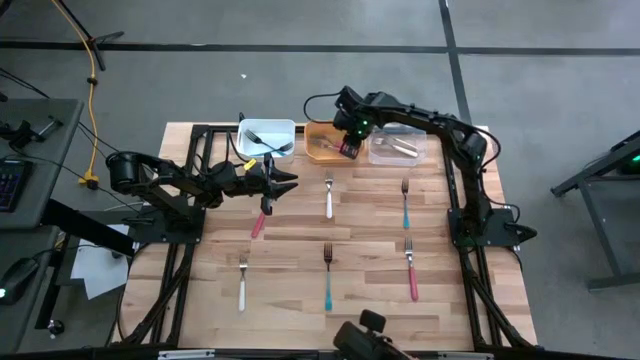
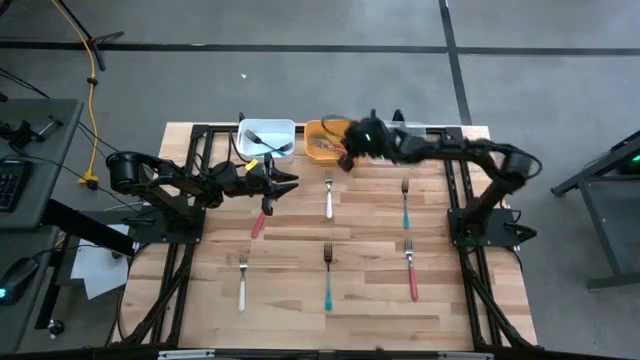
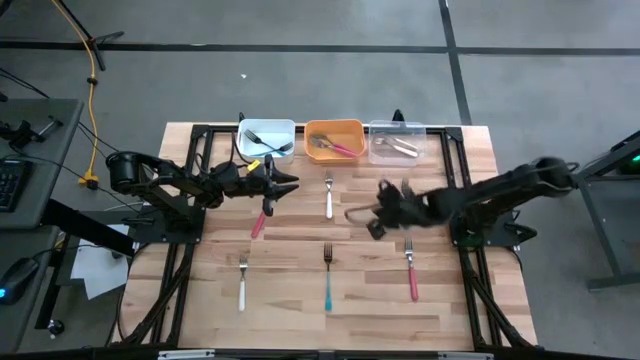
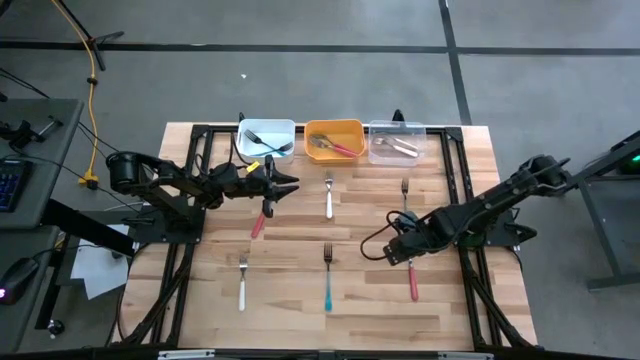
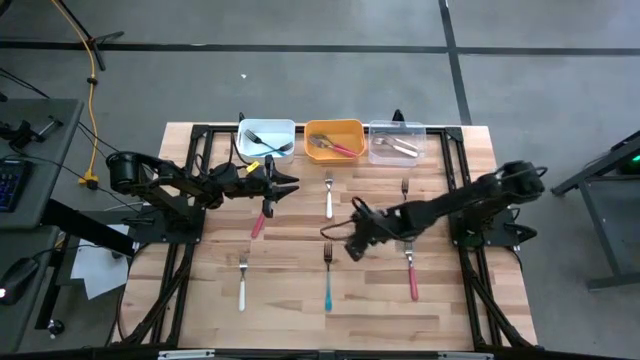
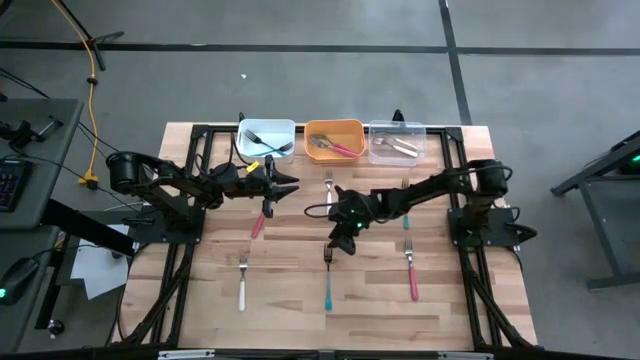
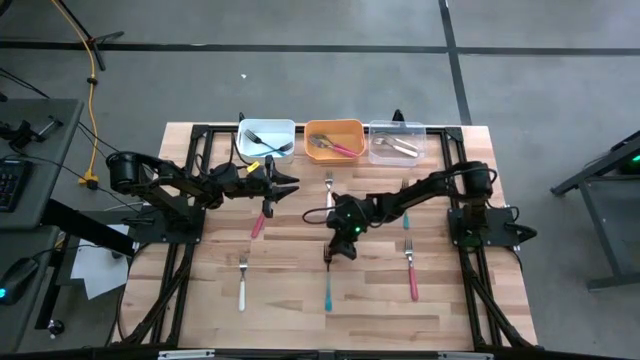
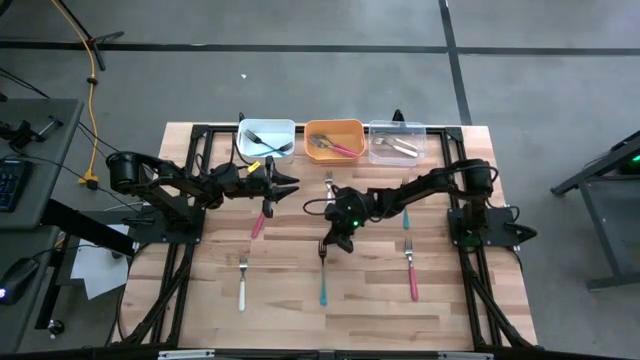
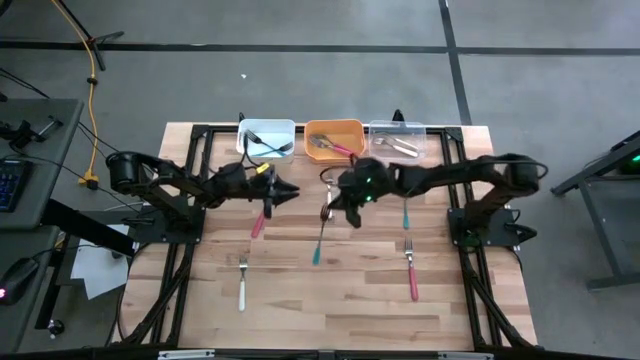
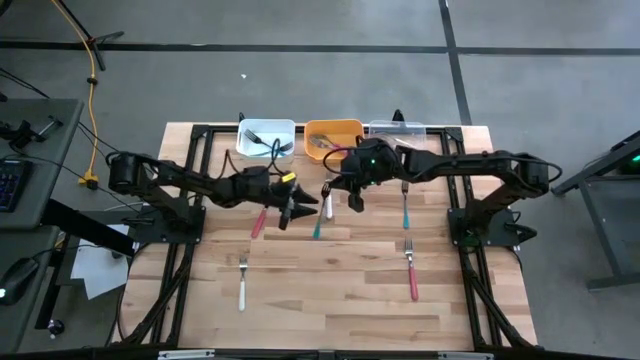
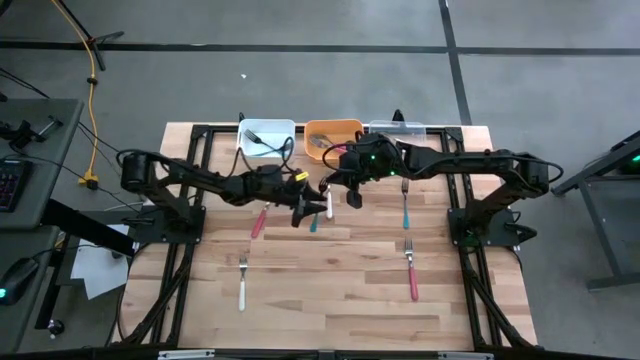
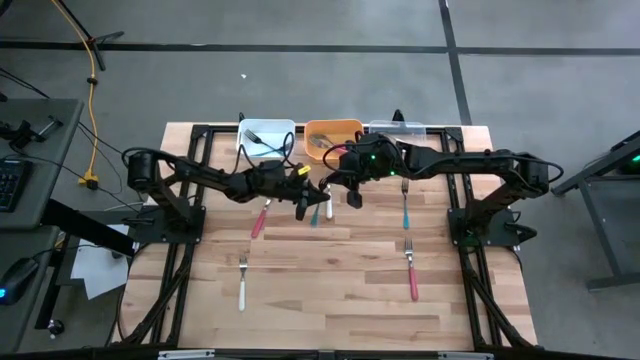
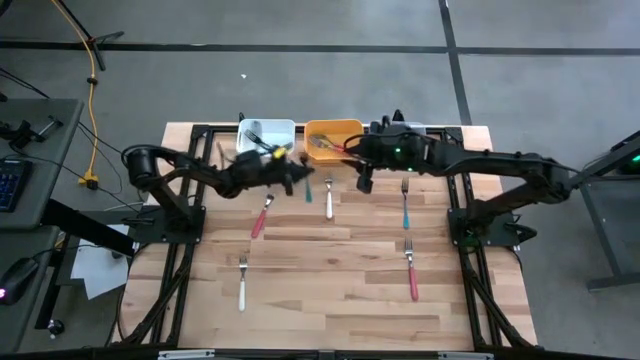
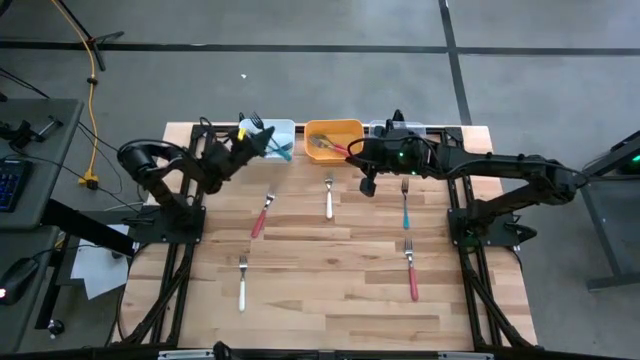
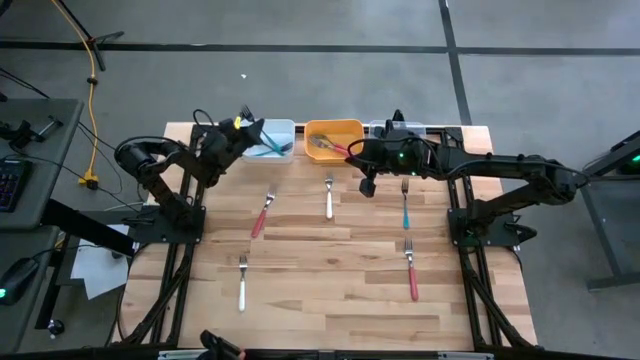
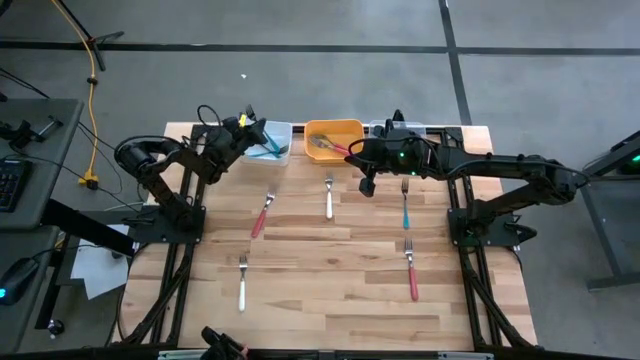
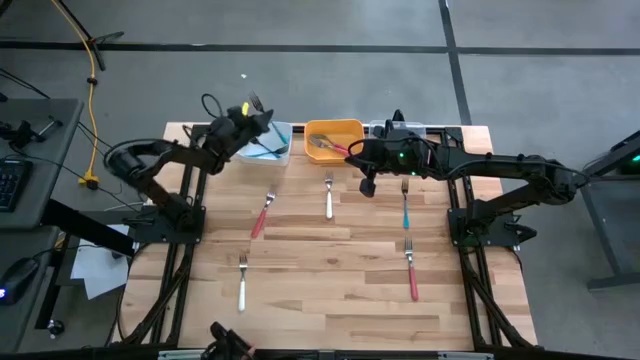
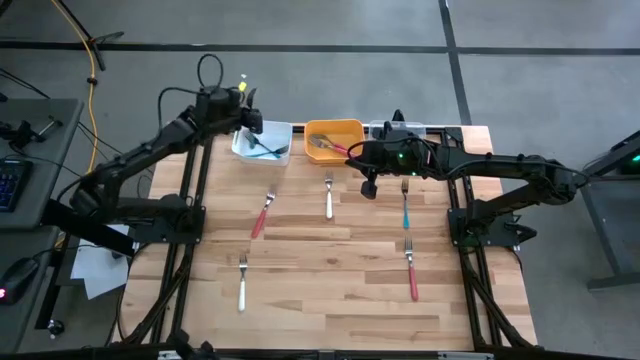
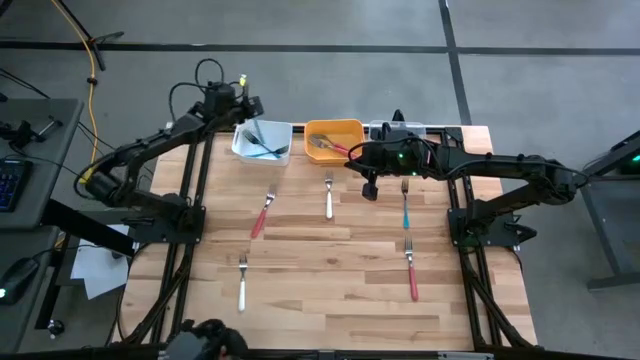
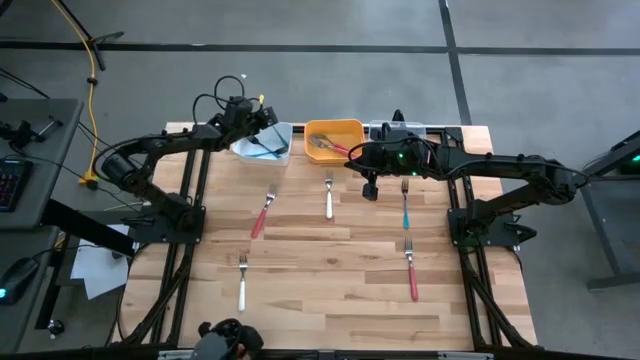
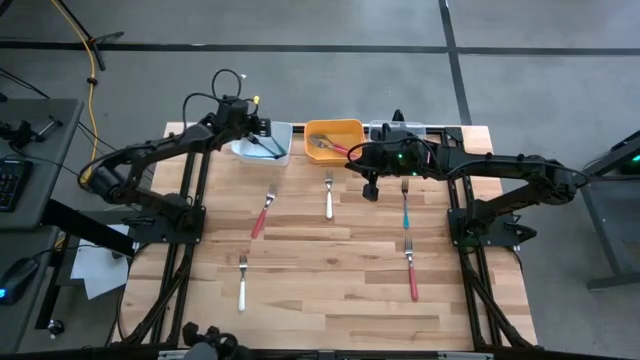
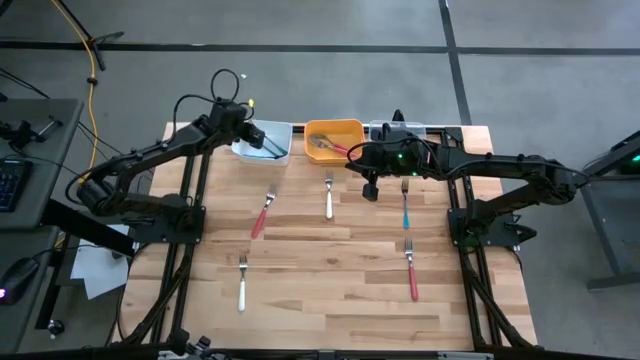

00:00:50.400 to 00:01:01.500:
Task: Sort silverware by color (type)
Put the bottom blue fork into the white bin

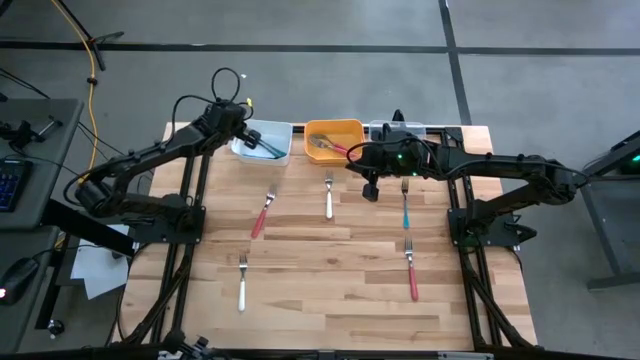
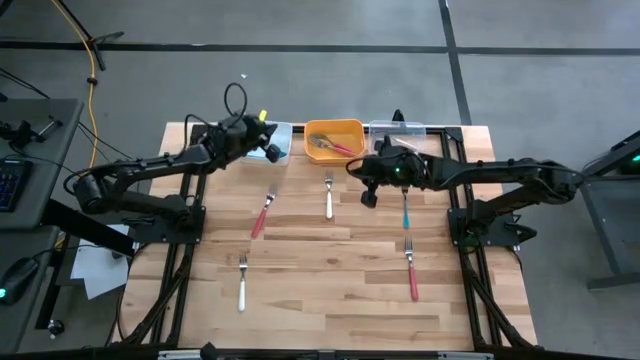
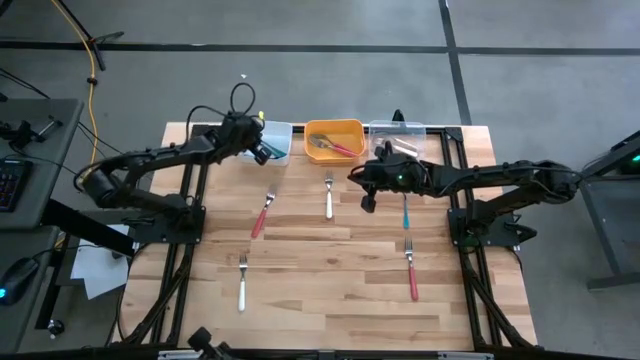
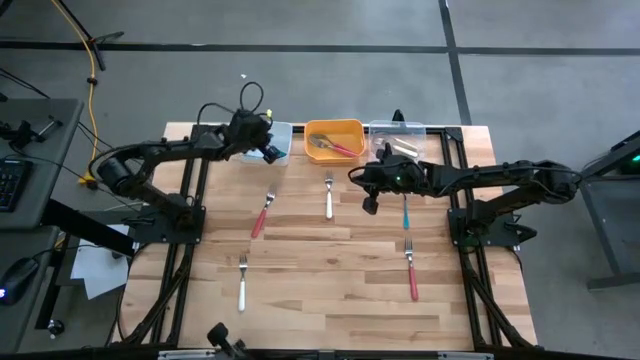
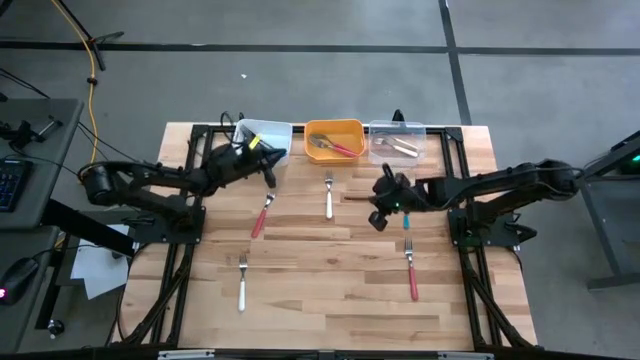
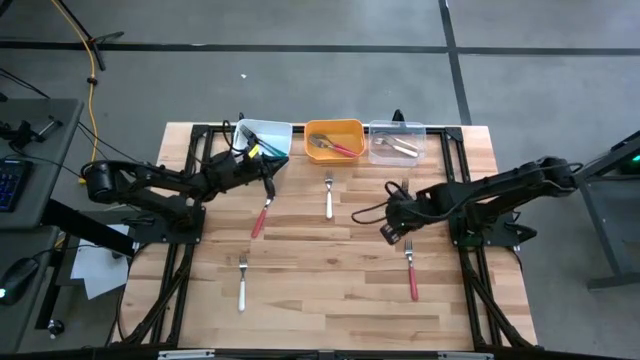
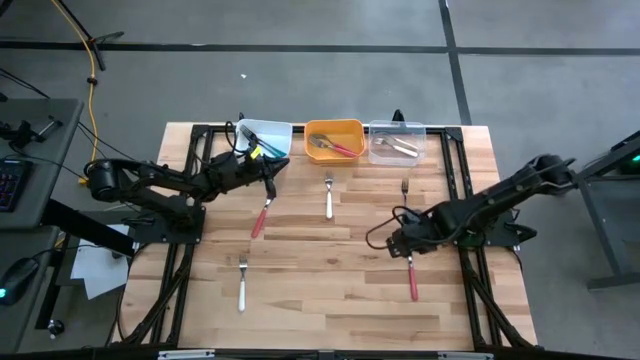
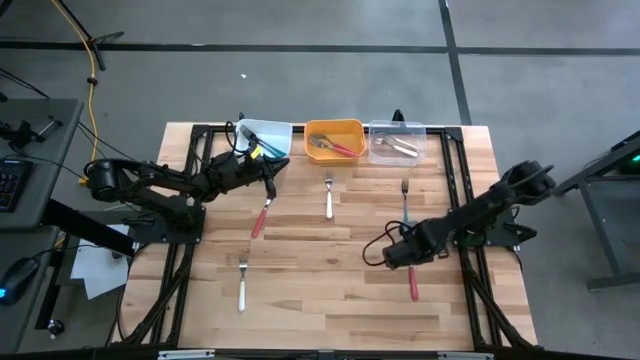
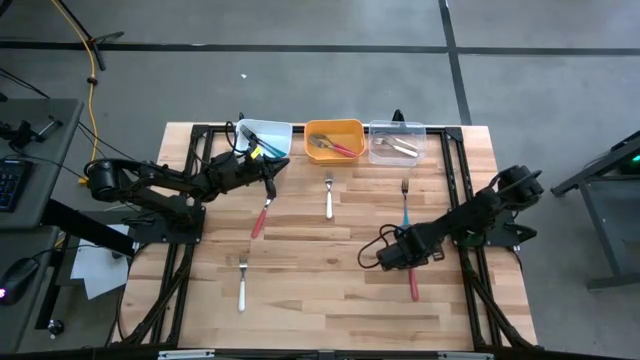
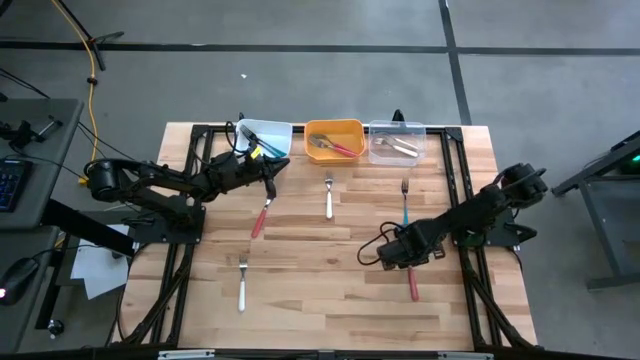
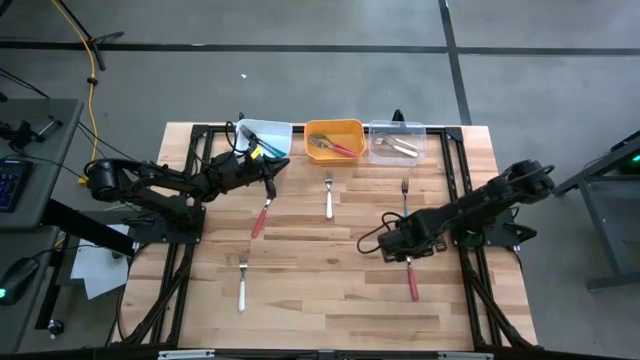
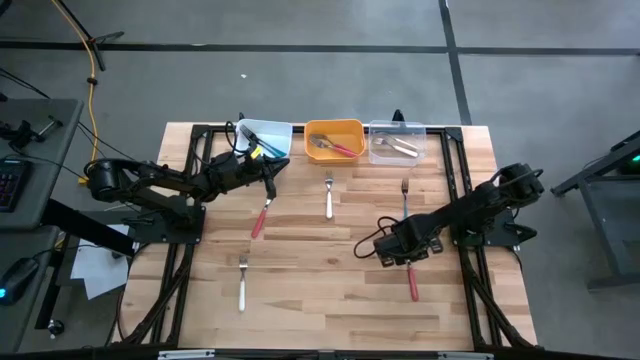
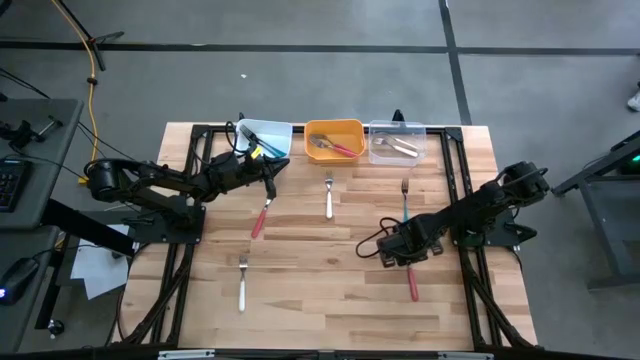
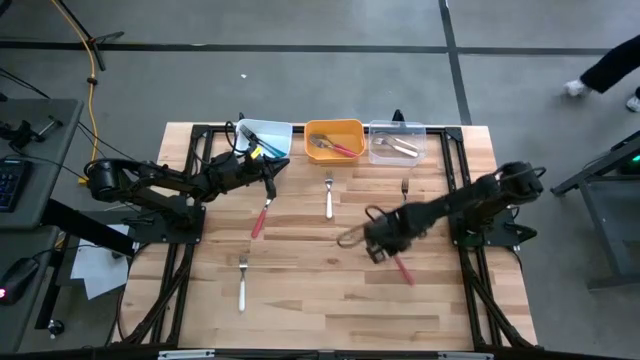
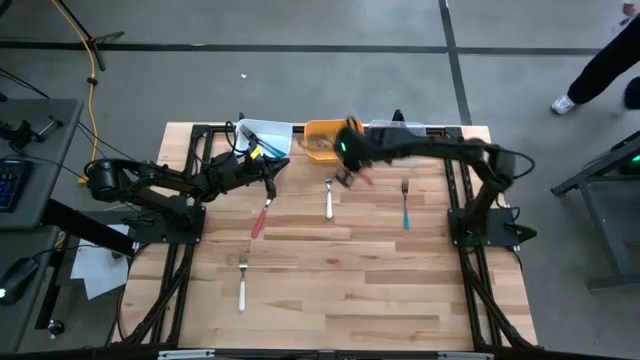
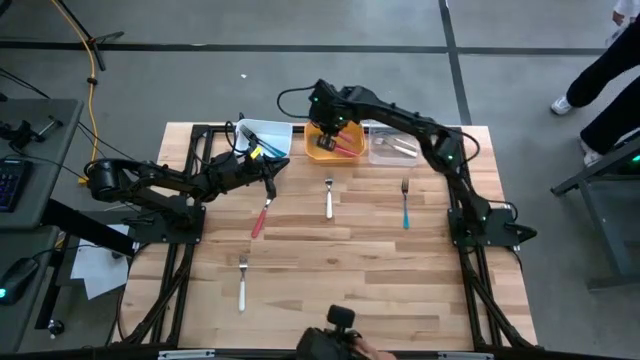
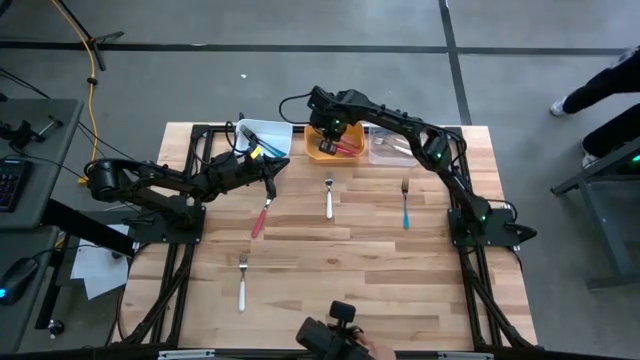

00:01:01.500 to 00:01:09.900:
Put the bottom pink fork into the yellow bin

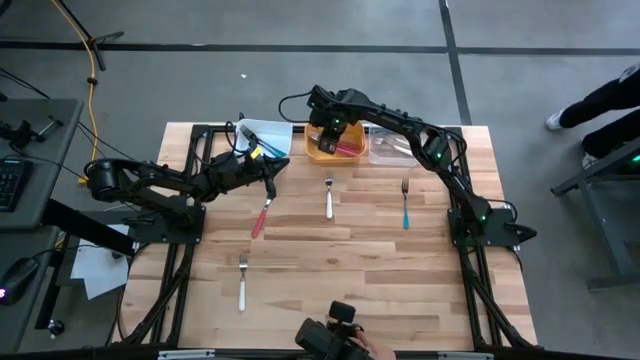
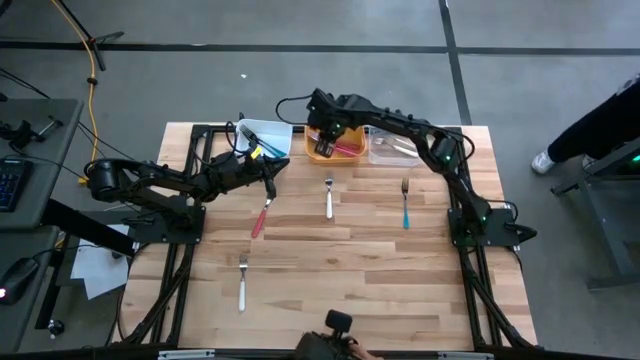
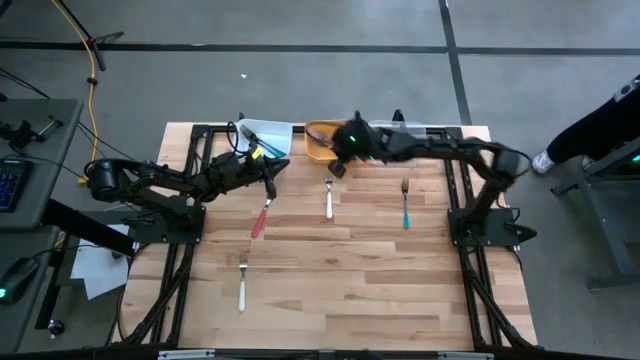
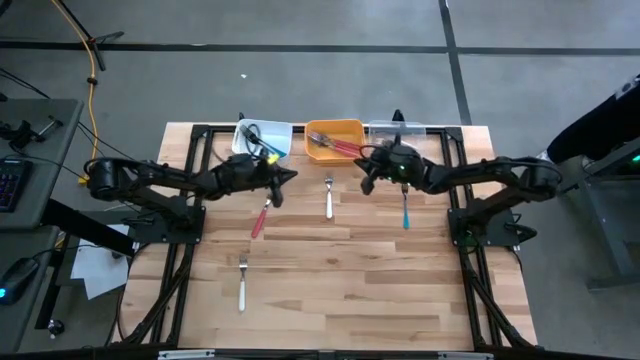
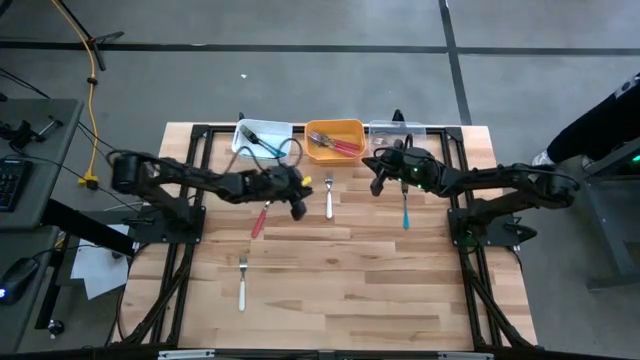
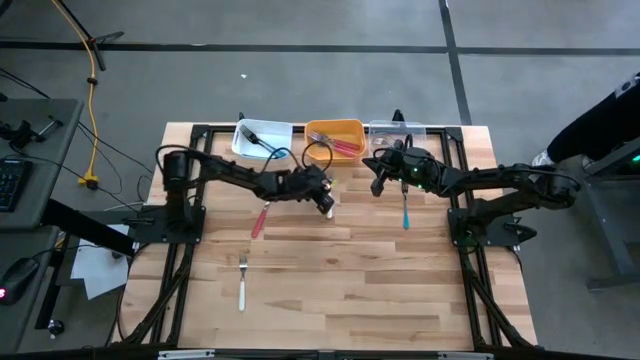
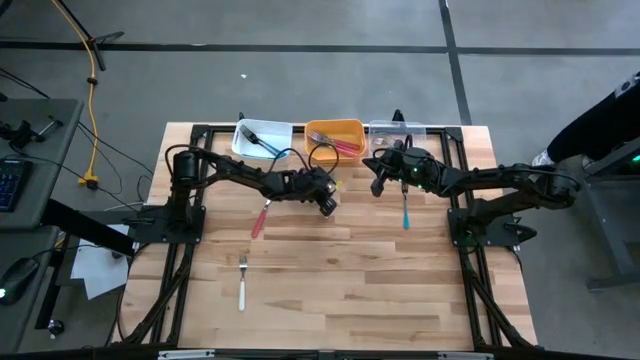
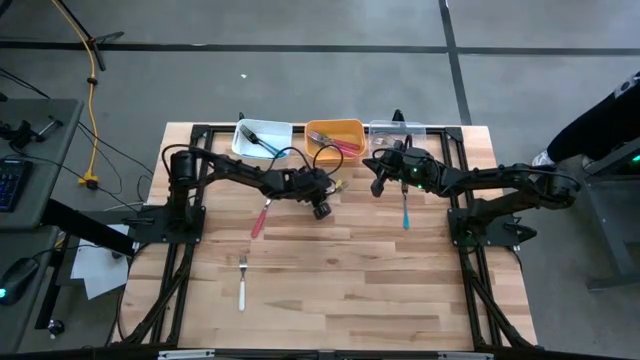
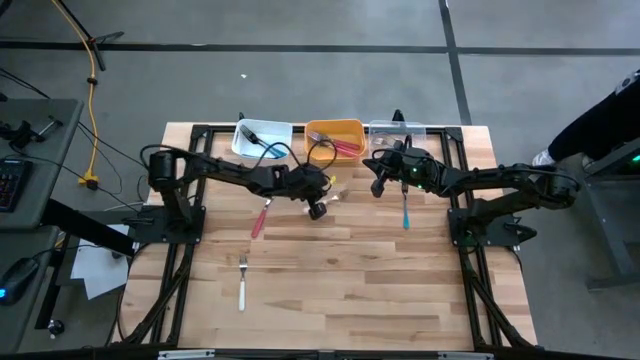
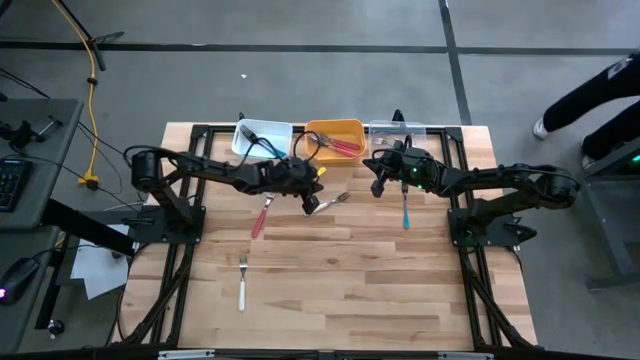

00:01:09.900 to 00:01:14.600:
Put the top white fork into the transparent bin
